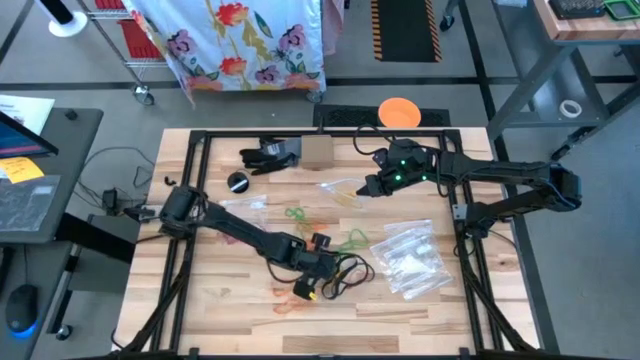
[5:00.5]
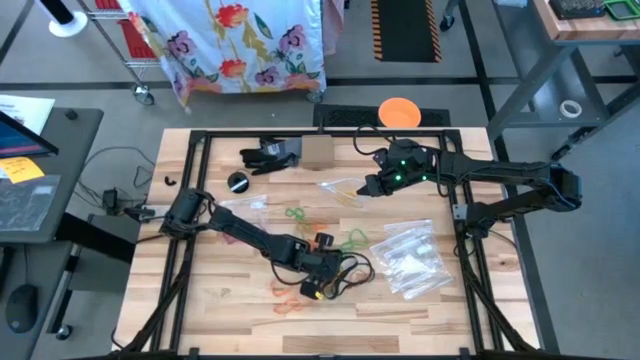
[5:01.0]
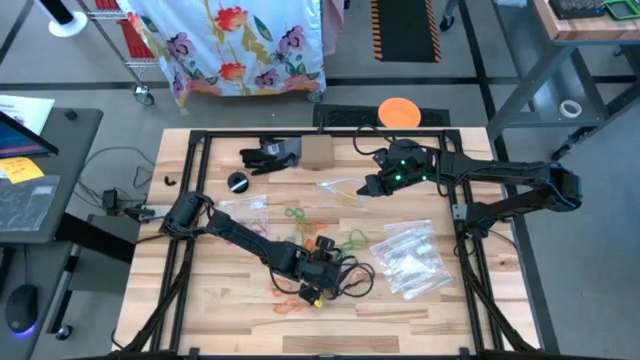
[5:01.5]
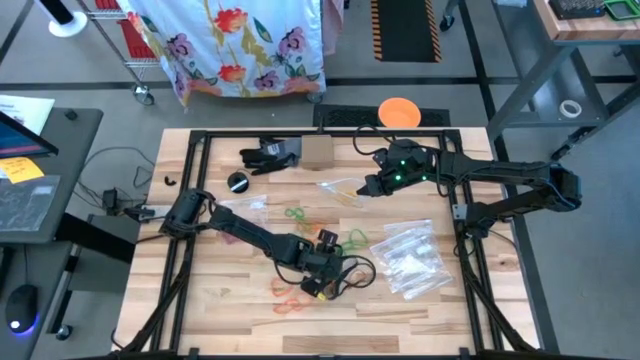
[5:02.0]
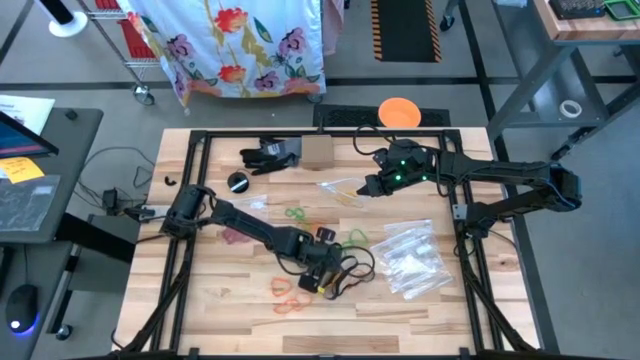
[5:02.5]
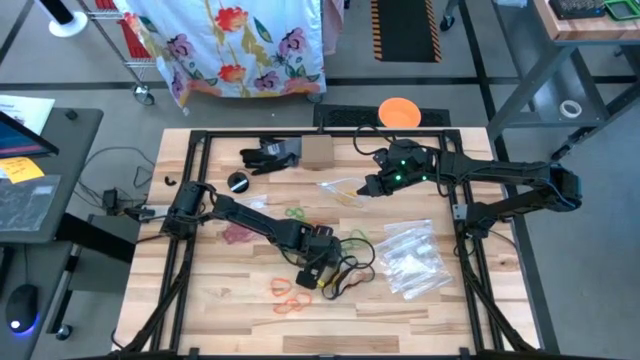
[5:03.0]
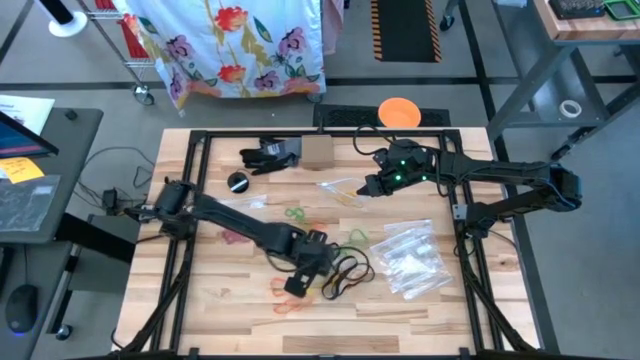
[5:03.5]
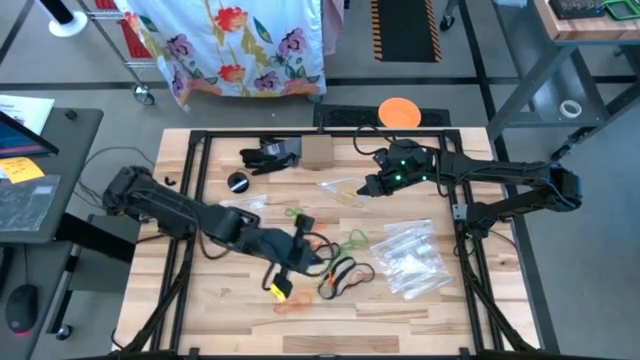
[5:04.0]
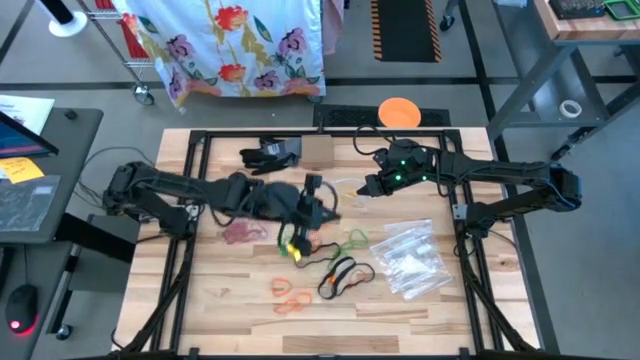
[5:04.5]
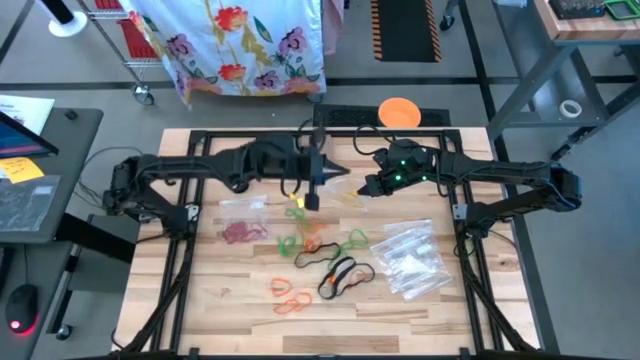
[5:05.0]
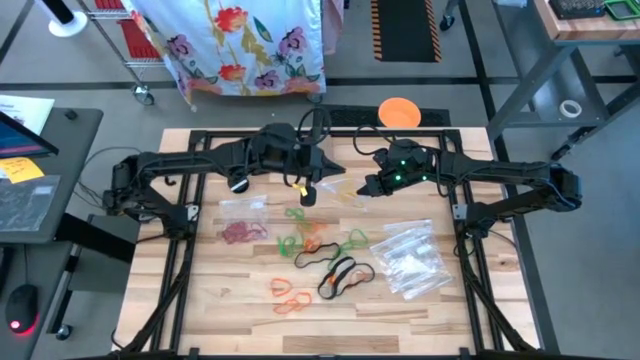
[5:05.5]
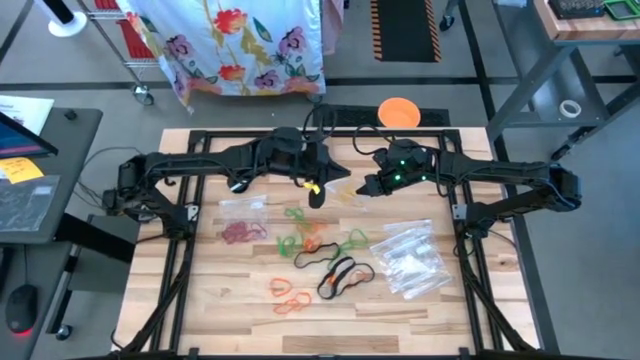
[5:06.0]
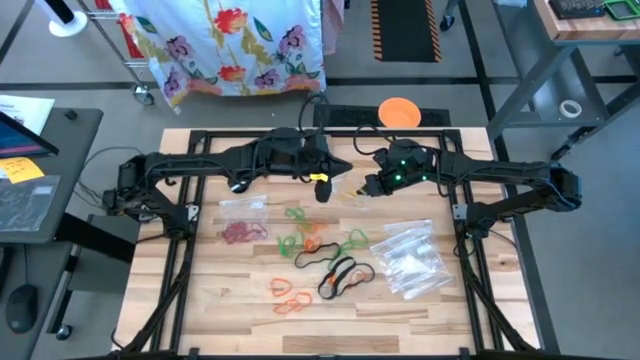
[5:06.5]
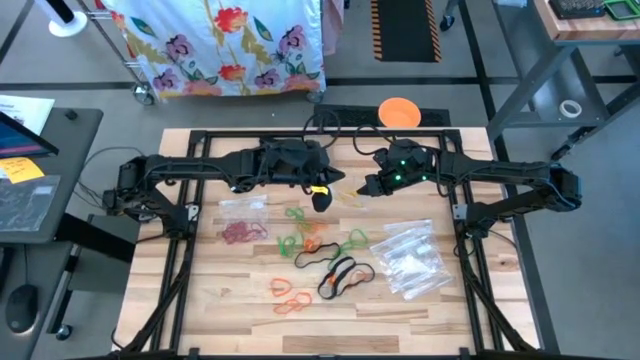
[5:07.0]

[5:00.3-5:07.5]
Task: Sort rubber bands
Put the yellow rubber band into the transparent zip bag

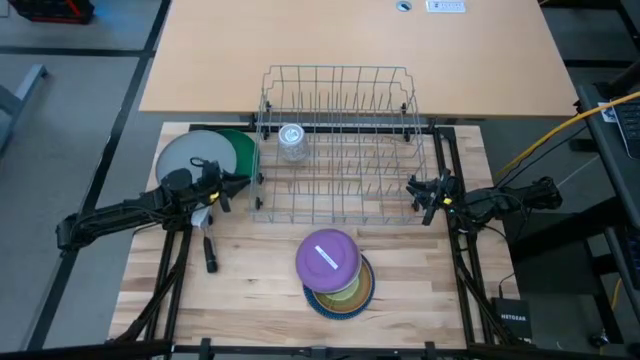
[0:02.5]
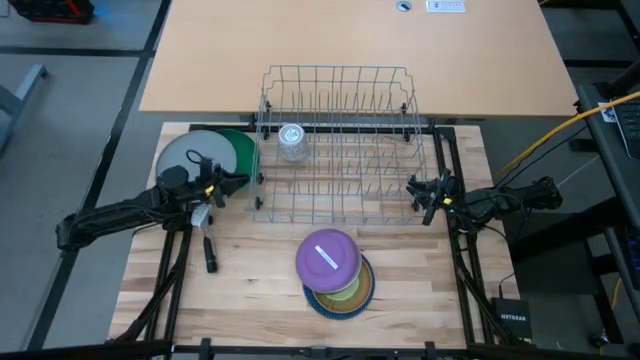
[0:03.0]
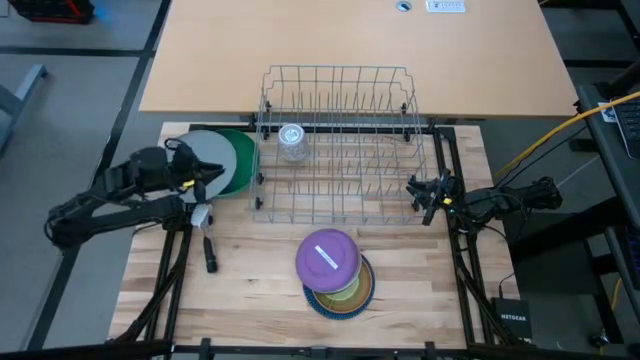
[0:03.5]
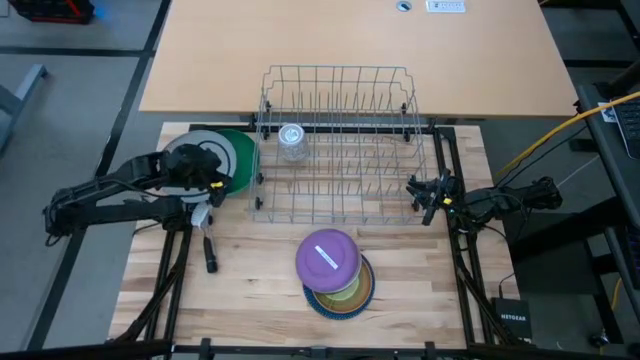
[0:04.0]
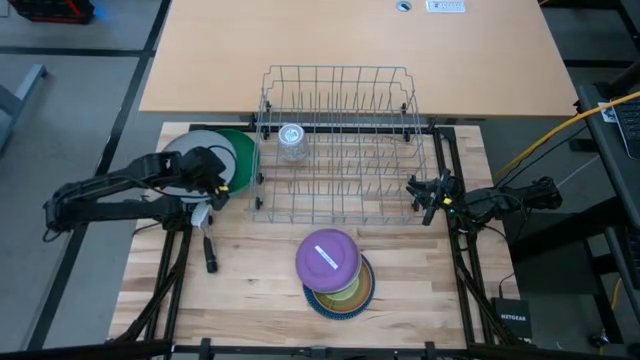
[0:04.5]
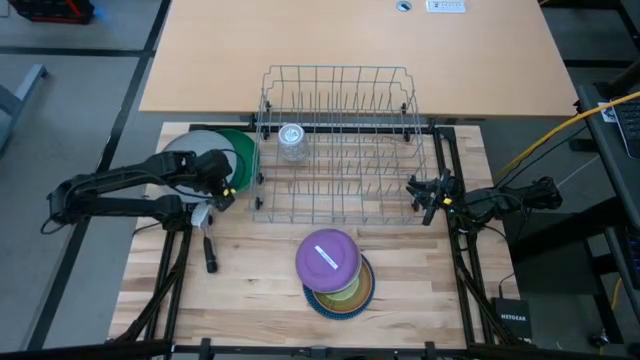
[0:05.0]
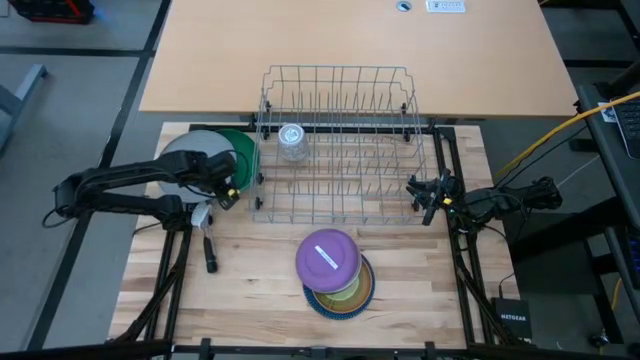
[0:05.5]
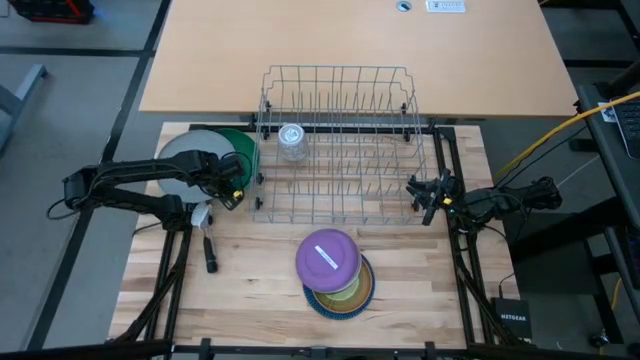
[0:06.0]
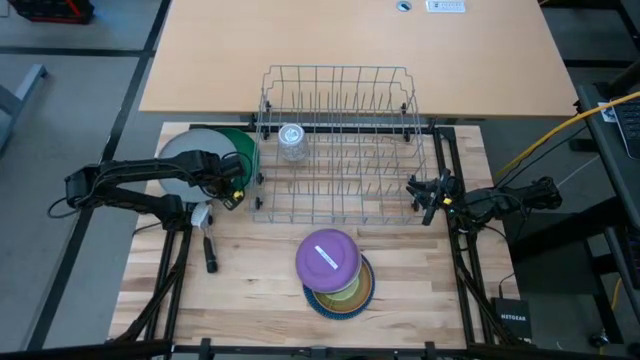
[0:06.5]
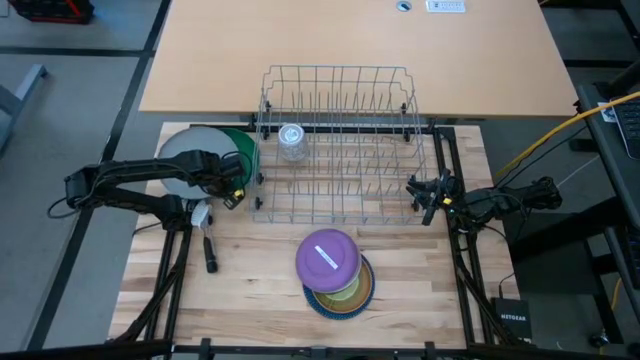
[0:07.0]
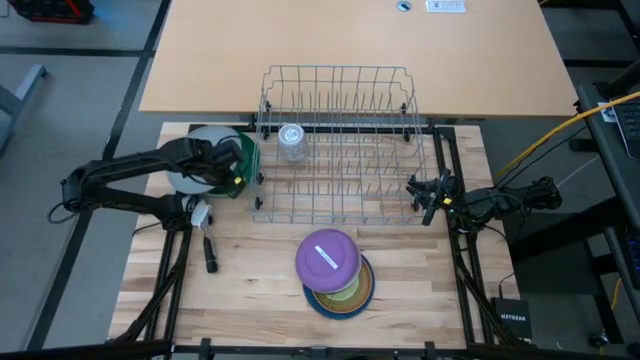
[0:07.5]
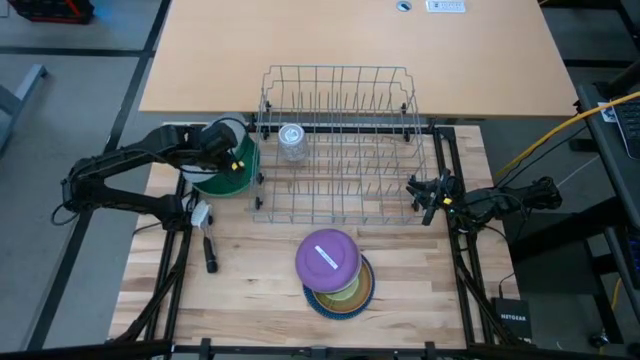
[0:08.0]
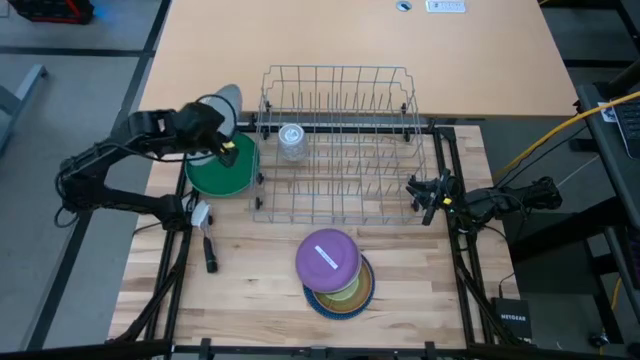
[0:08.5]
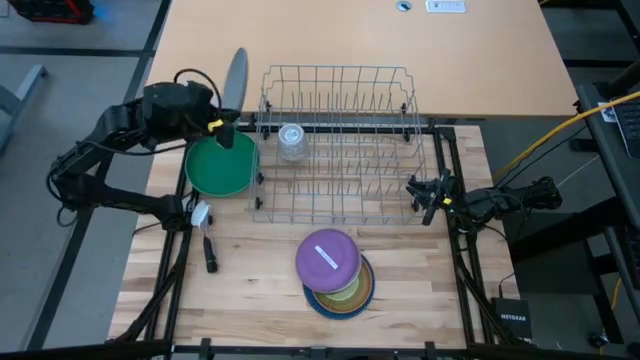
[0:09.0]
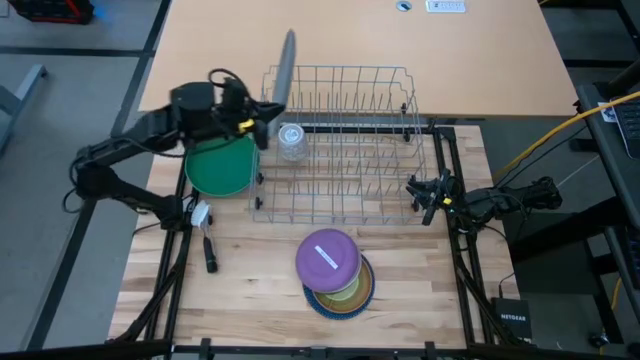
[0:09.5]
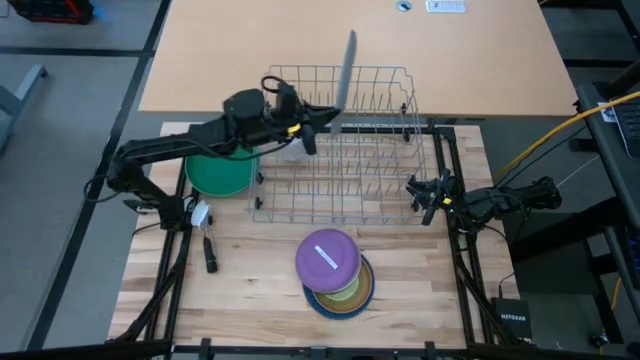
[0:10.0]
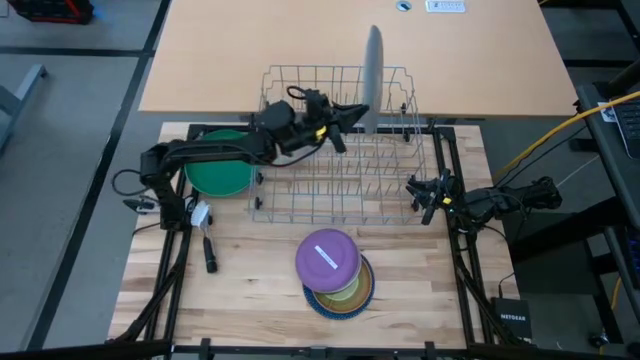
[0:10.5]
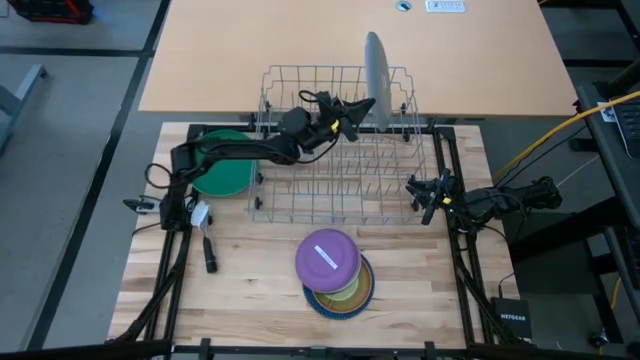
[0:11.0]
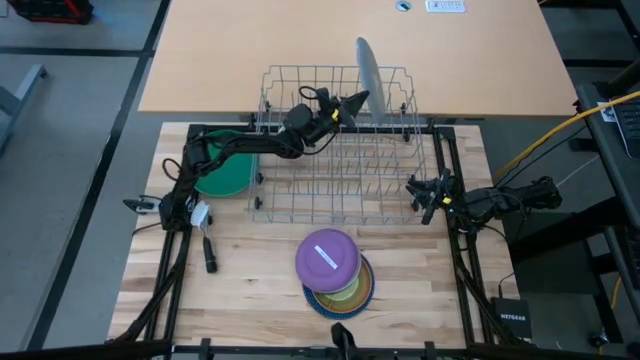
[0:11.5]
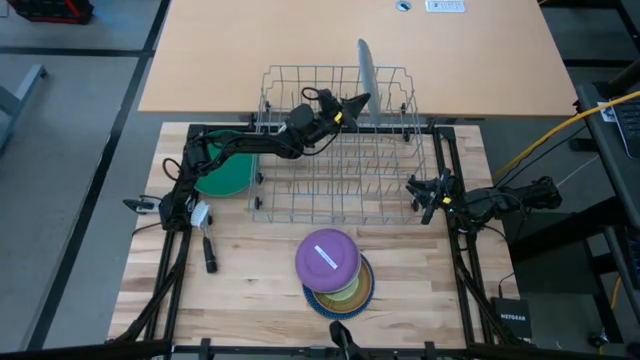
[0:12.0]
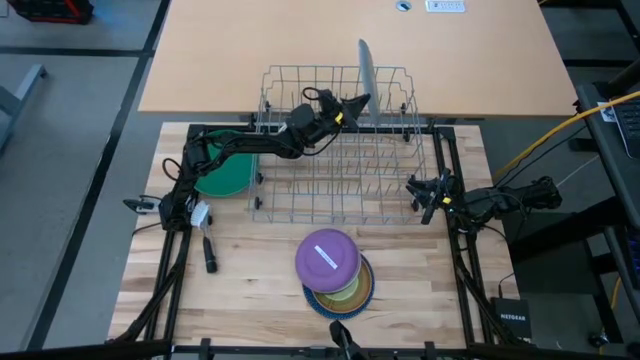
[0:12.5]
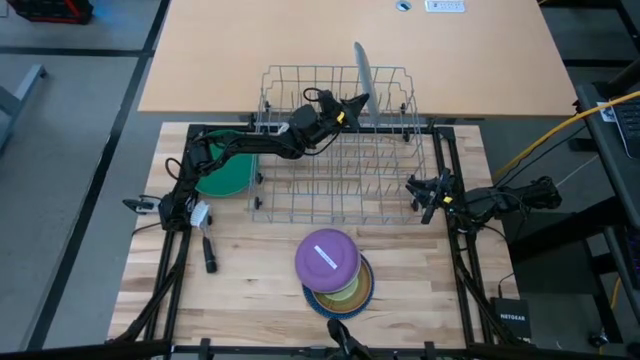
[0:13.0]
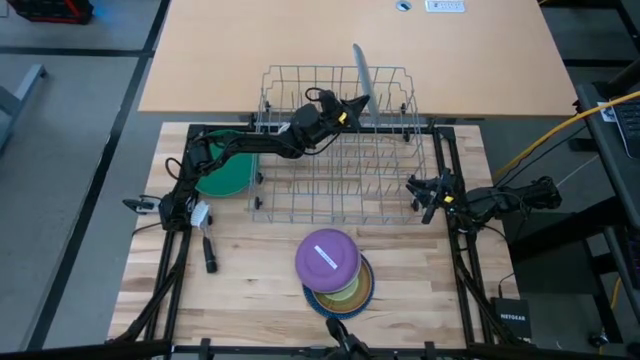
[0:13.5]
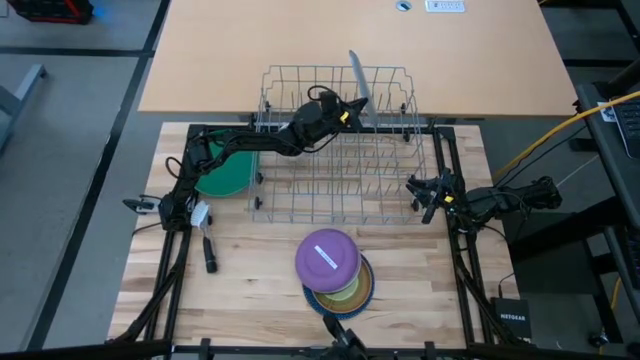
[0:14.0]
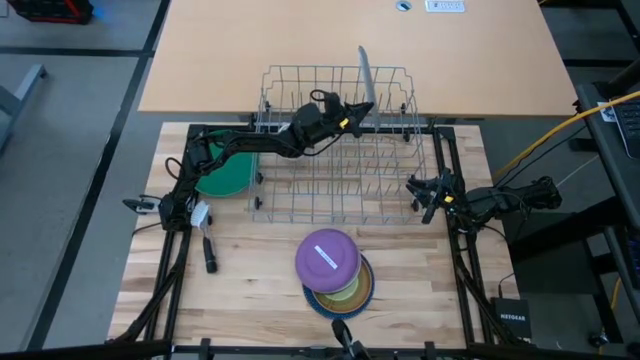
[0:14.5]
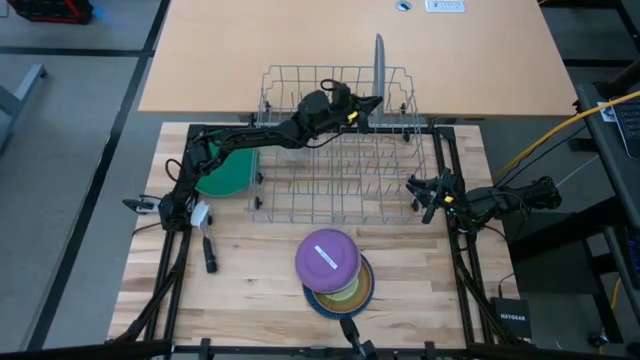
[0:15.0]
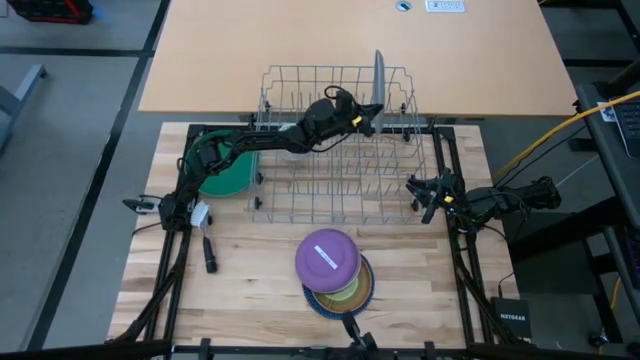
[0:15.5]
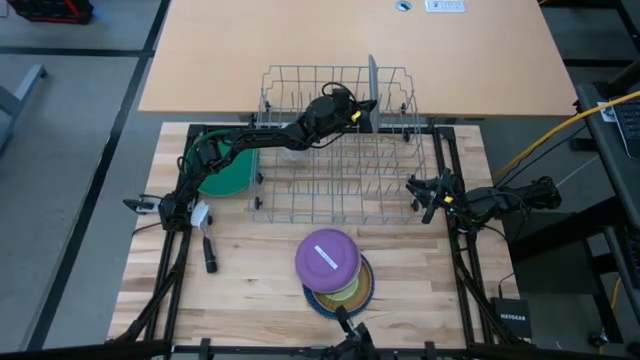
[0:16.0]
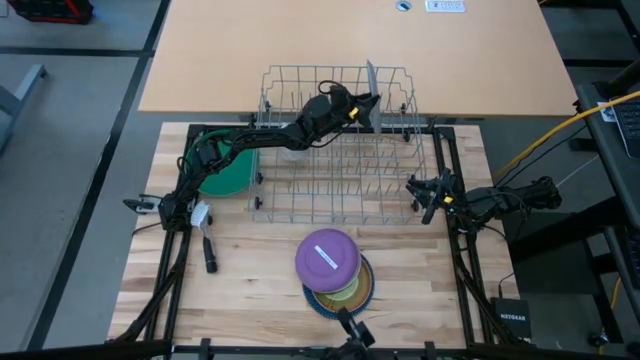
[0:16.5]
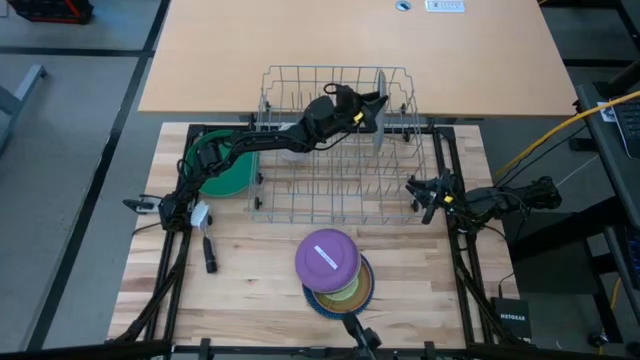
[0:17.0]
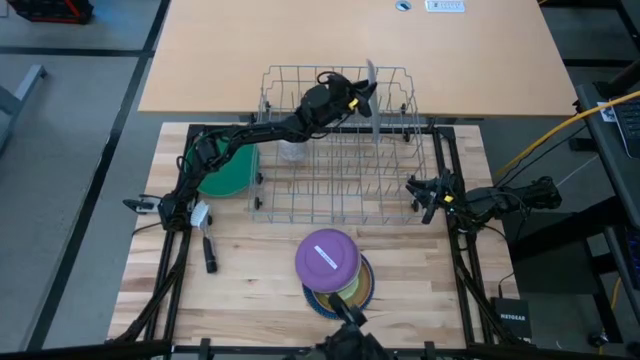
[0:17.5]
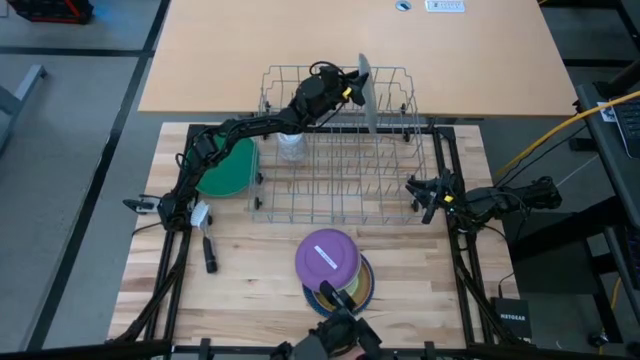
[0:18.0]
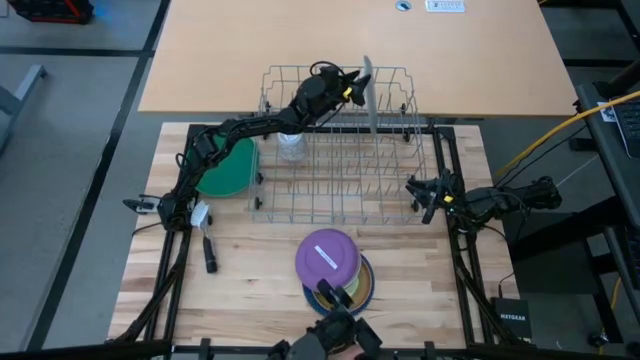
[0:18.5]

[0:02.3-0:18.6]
Task: Sort dishes
Put the gray plate in the dish rack
